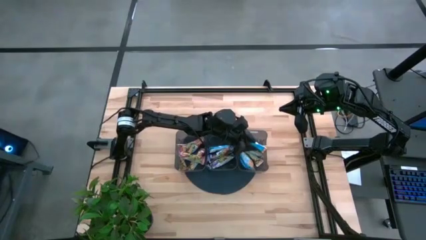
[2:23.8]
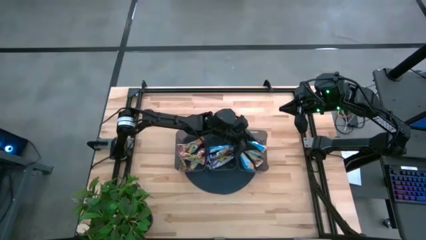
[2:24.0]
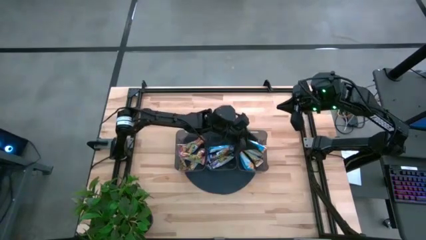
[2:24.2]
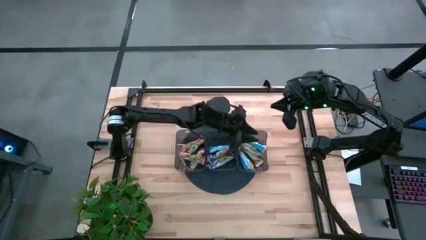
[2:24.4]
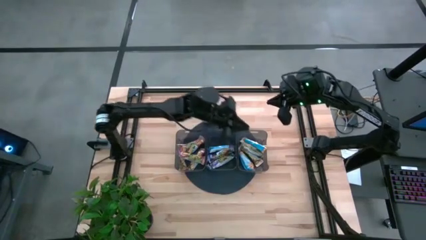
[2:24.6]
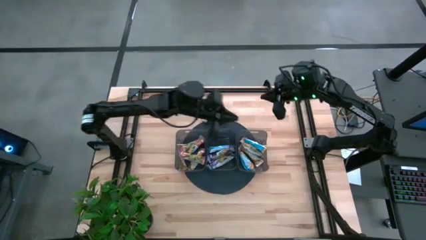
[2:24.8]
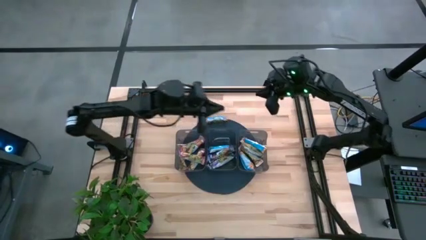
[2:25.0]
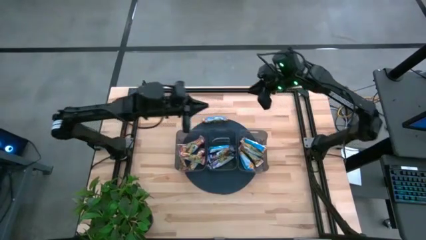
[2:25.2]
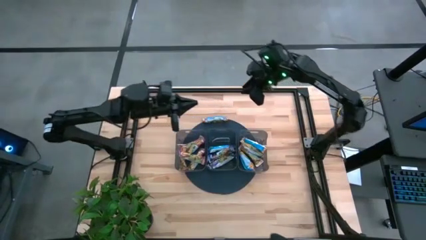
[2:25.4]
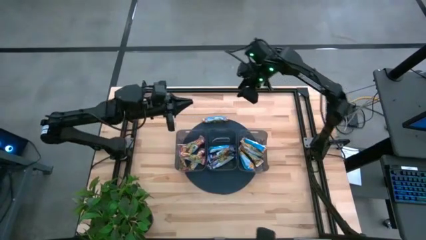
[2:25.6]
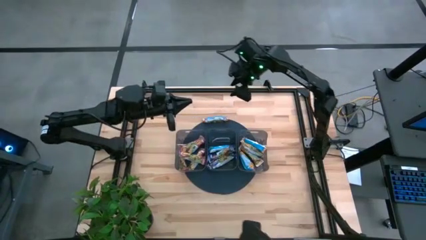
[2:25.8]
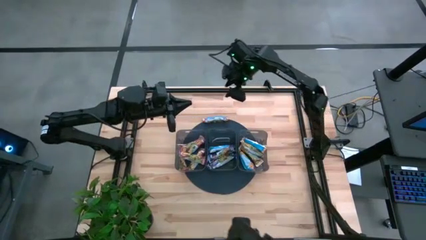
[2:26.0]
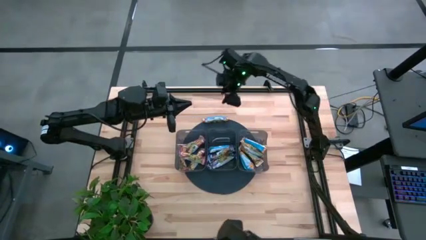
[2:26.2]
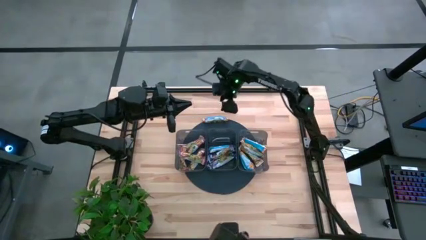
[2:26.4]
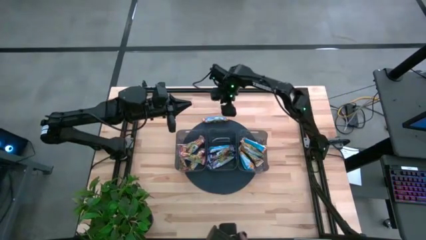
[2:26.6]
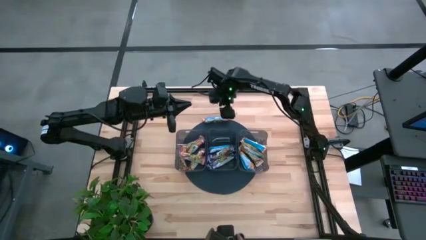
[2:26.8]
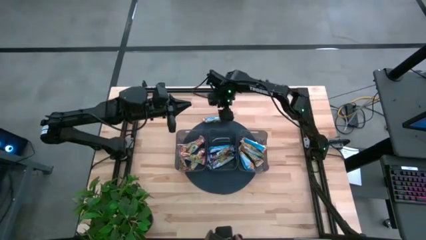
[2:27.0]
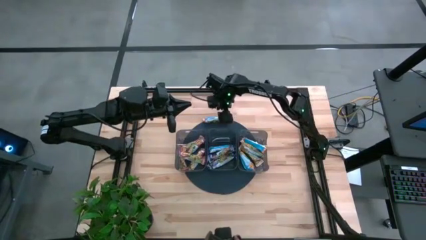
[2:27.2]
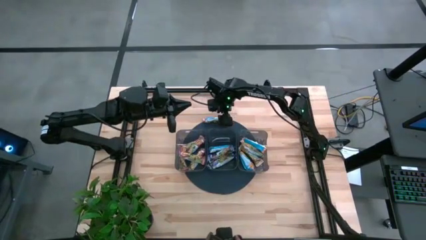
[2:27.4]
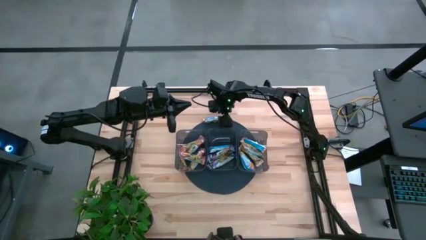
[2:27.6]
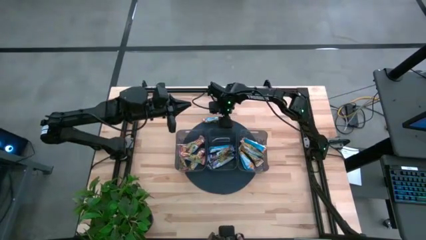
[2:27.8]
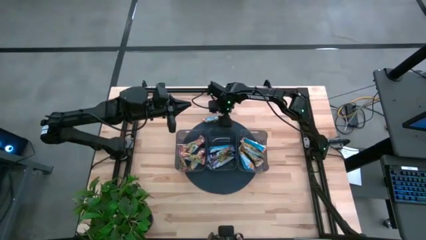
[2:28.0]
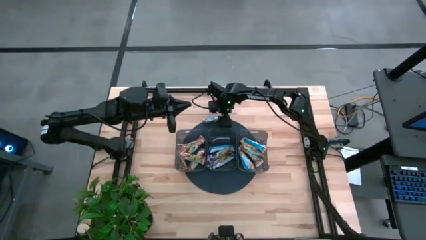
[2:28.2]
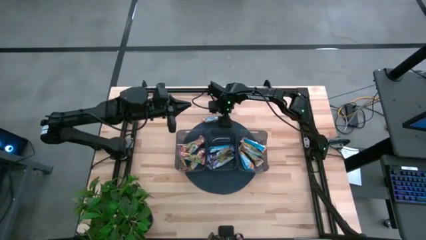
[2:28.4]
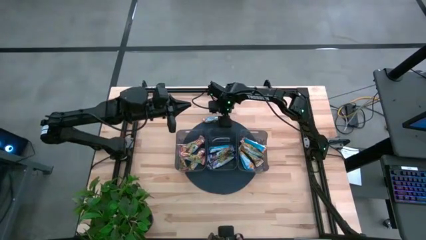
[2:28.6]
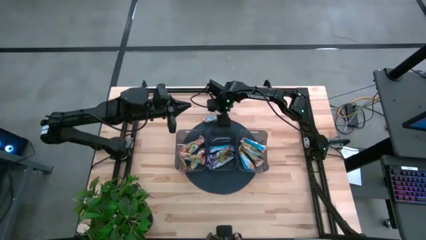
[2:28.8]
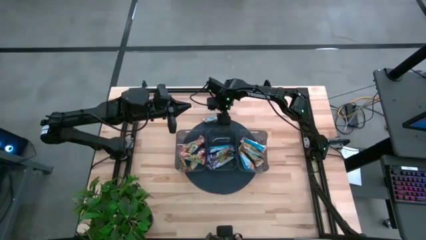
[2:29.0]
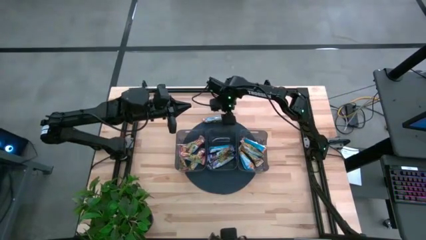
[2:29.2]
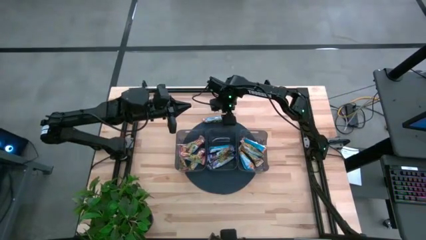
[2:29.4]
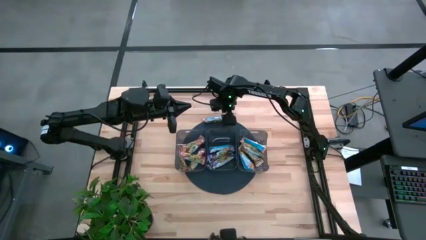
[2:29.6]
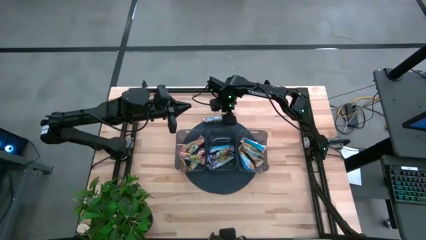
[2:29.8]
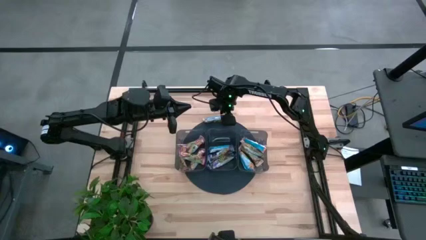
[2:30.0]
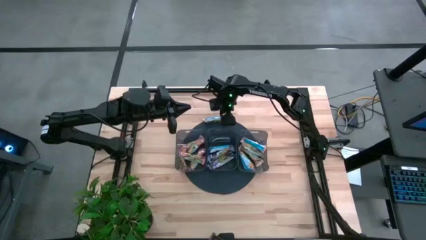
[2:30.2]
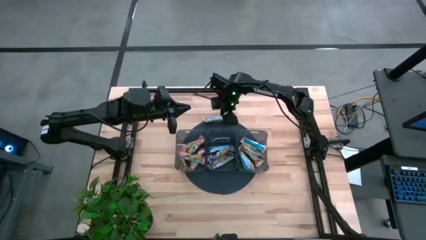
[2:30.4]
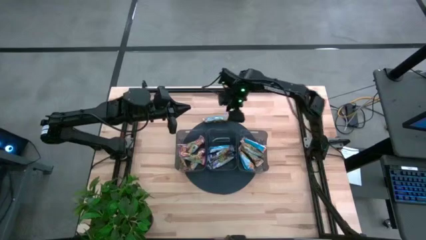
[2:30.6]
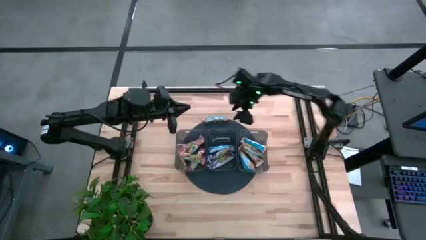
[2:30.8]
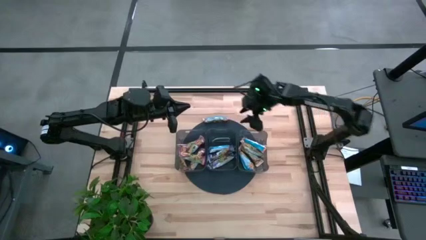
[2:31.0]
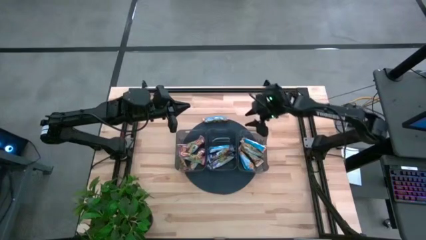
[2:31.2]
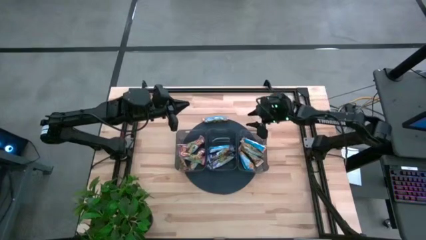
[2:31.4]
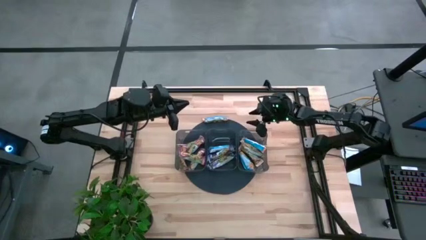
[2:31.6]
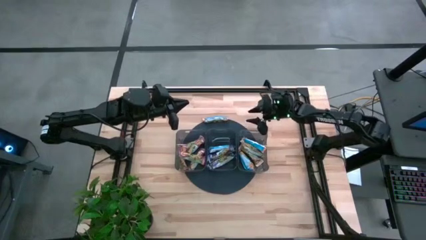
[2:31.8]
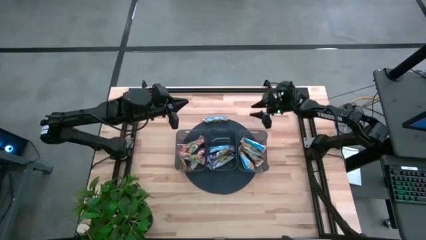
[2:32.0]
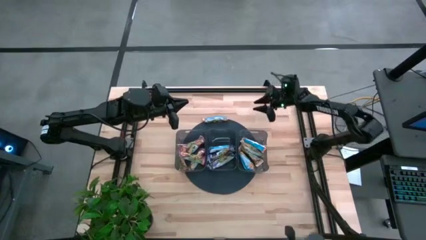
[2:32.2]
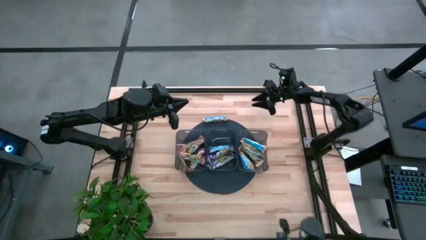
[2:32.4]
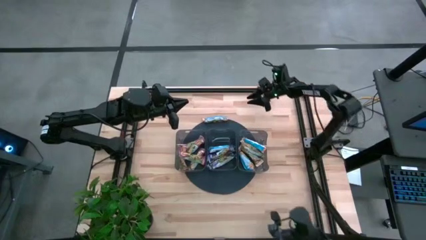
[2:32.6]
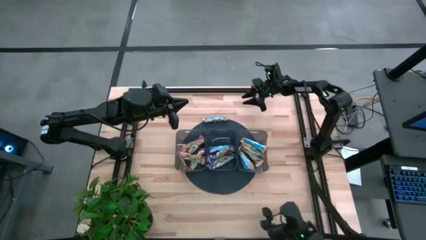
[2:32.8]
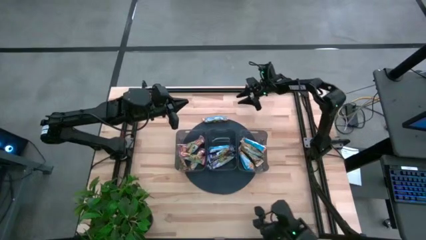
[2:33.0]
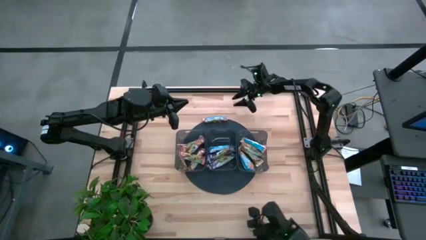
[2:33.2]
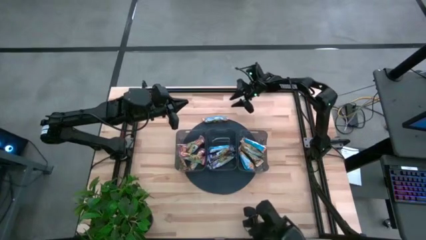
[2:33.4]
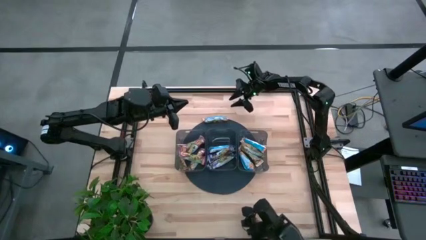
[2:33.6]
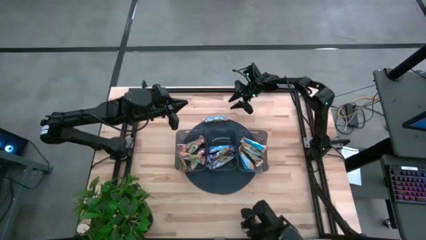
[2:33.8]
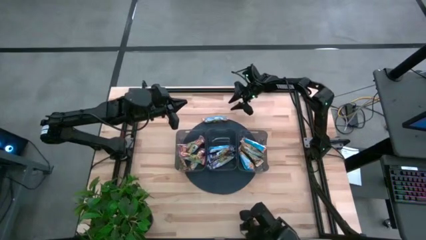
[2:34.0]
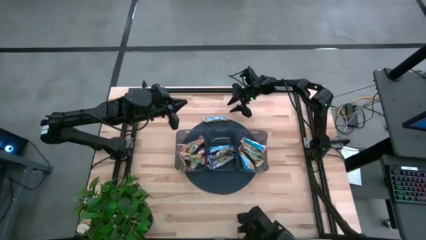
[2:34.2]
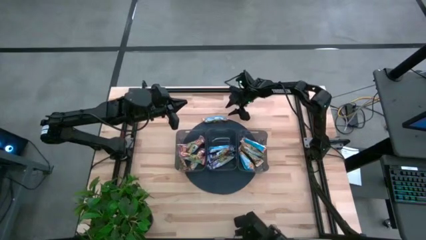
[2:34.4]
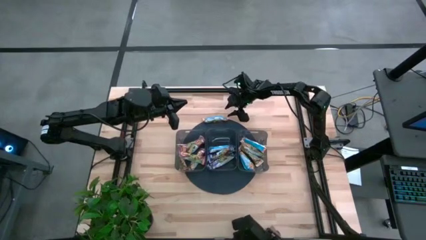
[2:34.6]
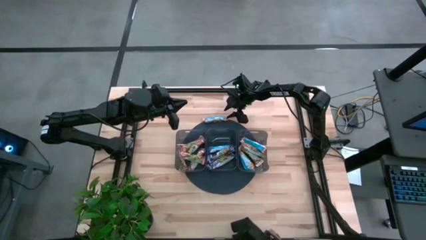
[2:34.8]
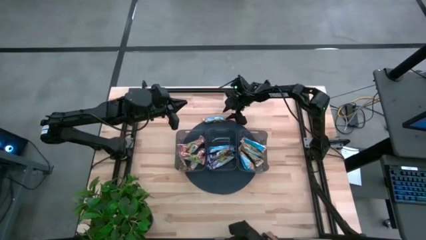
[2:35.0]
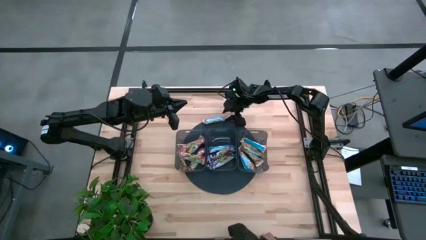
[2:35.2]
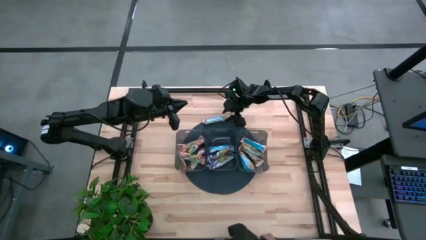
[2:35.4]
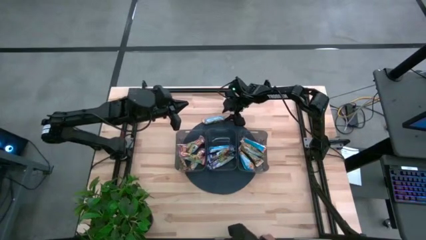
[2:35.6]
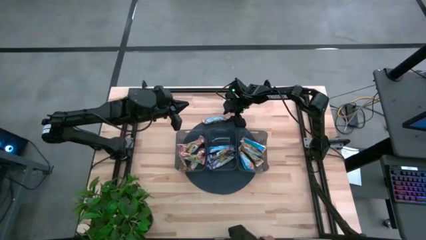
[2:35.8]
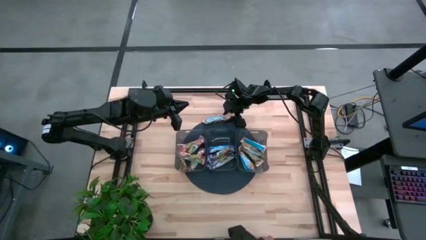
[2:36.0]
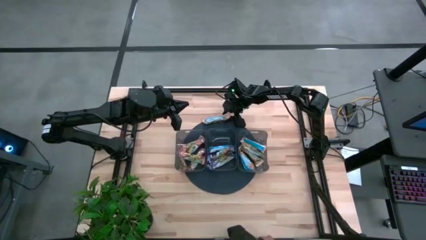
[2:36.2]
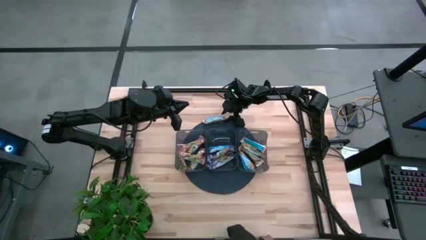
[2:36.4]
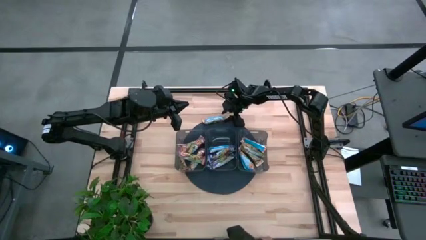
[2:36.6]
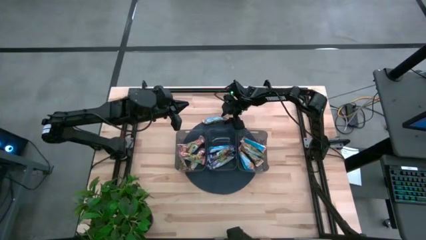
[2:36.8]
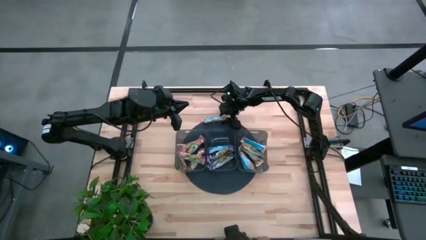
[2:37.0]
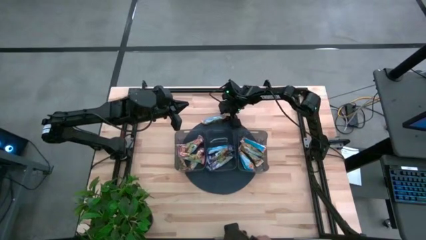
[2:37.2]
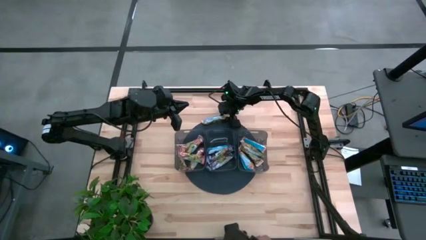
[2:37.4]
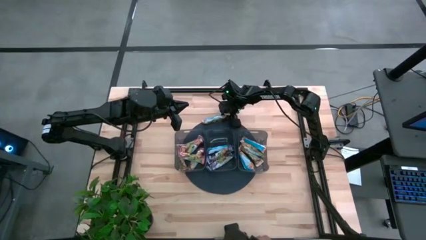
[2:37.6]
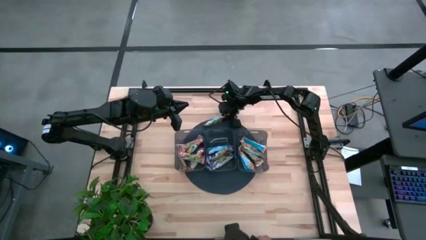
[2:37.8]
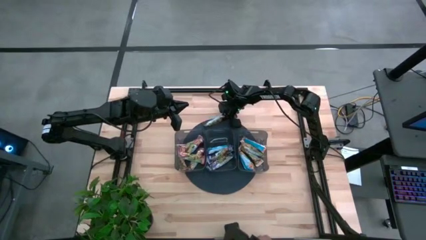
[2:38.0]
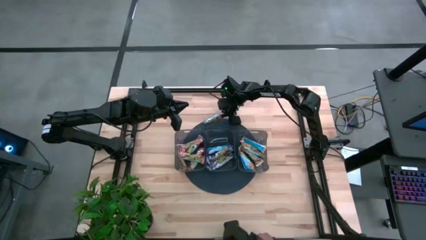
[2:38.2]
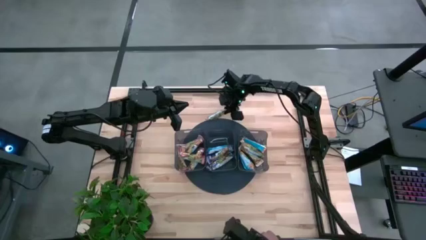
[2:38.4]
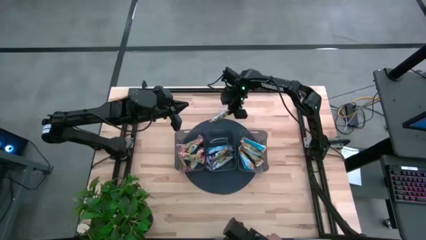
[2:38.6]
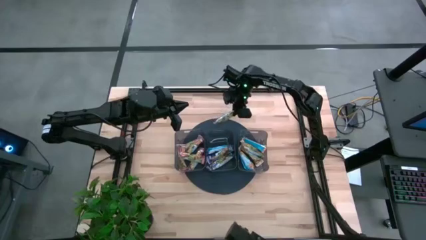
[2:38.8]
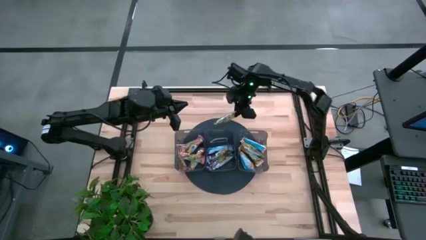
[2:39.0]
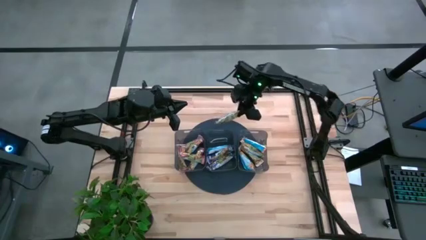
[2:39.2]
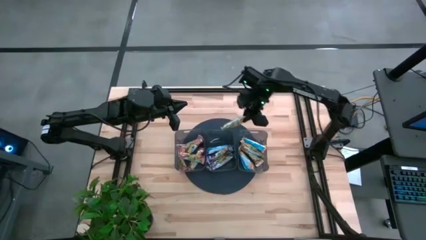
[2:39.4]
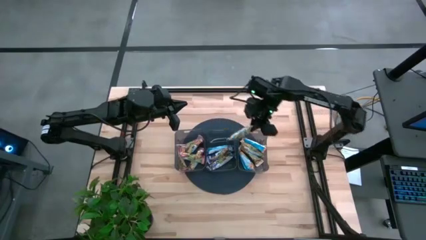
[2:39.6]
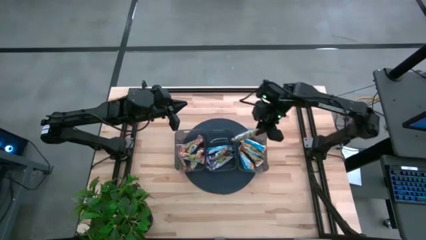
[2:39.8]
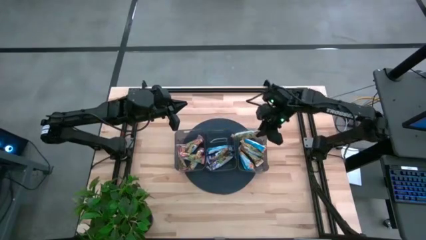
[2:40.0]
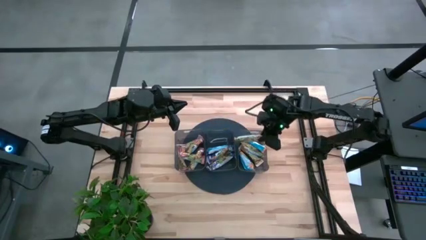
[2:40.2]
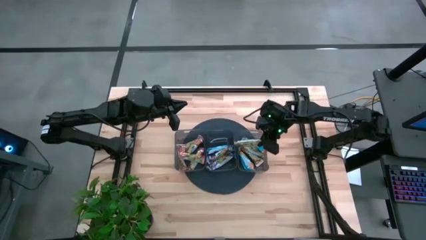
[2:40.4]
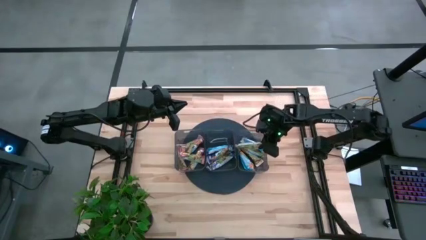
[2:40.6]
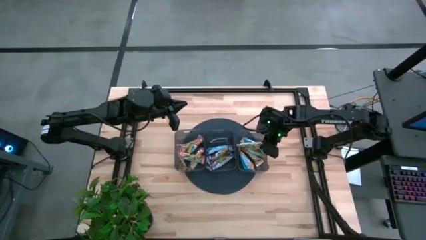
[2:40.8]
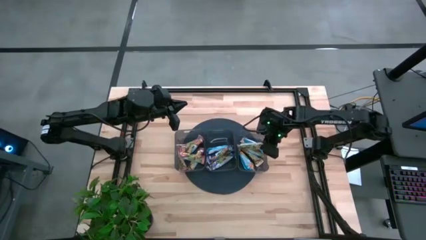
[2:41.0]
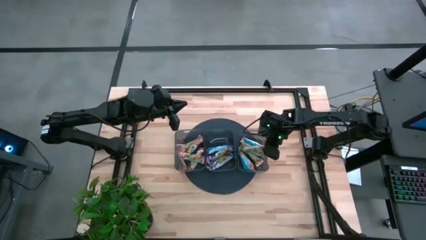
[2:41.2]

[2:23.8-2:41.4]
Task: Pick and place Granola Bars by type
Put the yellow granola bar into the right black bin
